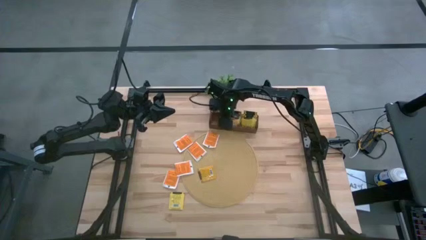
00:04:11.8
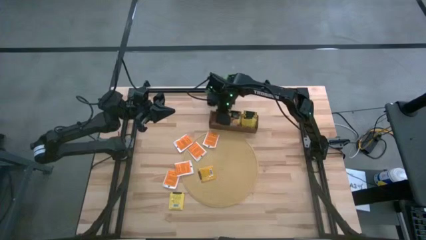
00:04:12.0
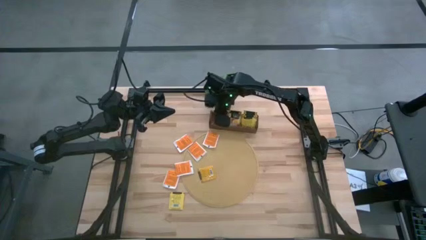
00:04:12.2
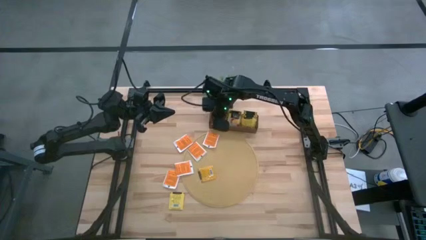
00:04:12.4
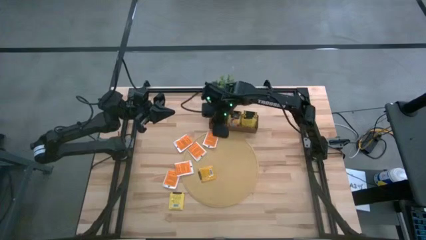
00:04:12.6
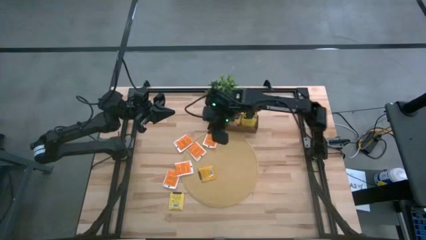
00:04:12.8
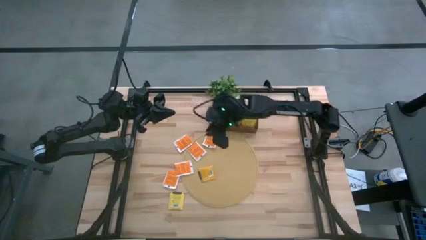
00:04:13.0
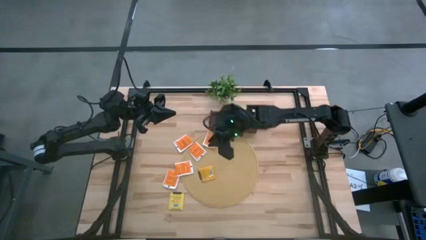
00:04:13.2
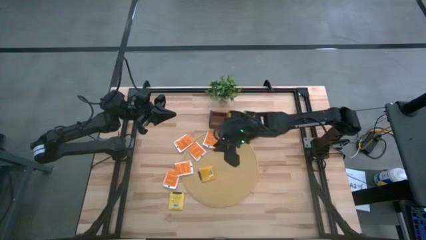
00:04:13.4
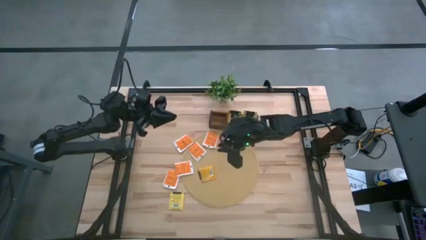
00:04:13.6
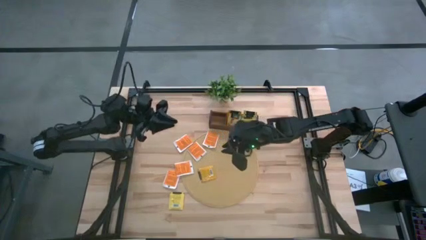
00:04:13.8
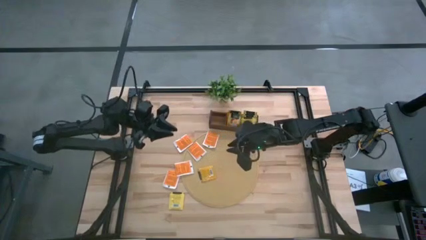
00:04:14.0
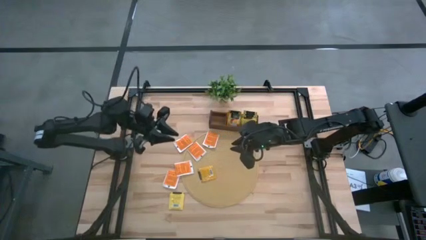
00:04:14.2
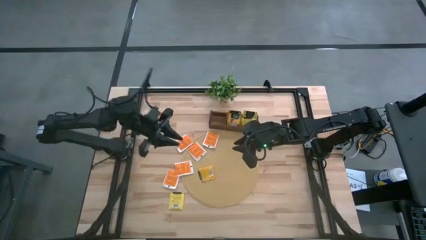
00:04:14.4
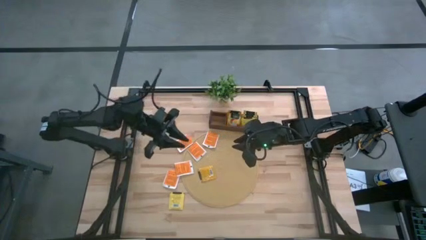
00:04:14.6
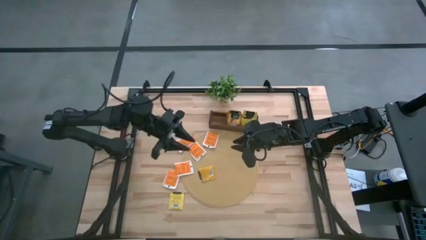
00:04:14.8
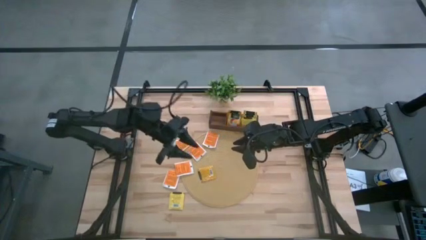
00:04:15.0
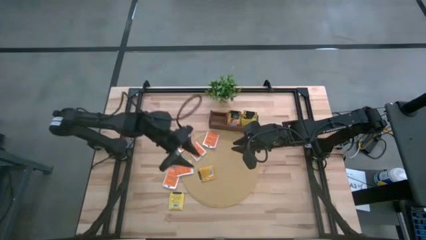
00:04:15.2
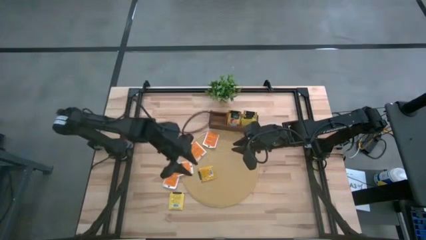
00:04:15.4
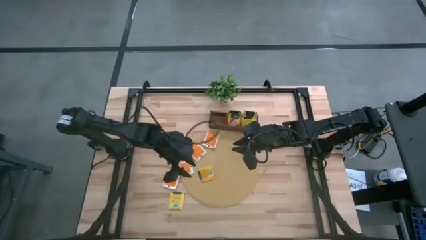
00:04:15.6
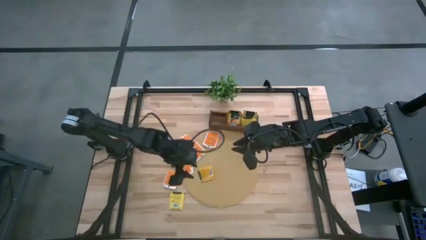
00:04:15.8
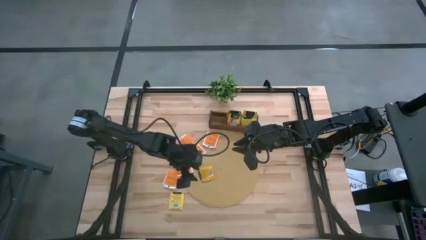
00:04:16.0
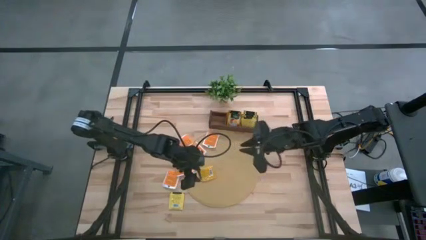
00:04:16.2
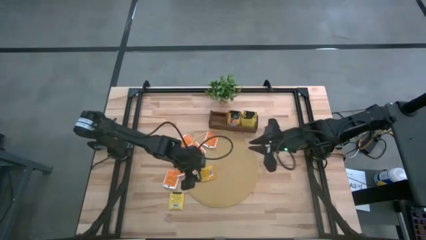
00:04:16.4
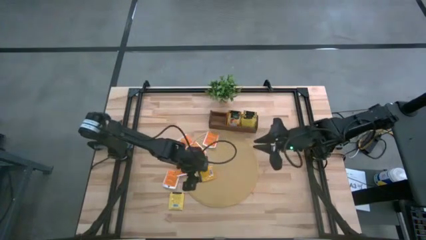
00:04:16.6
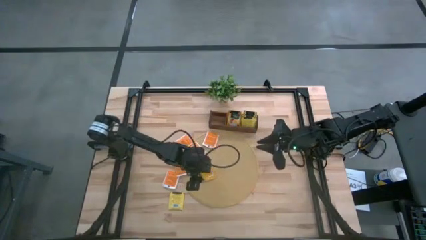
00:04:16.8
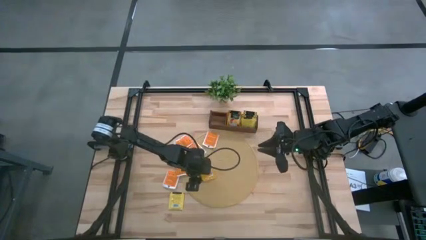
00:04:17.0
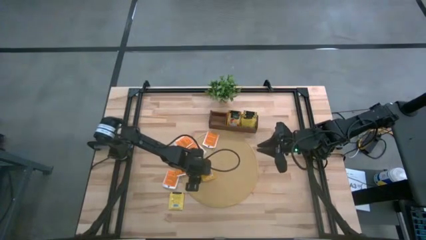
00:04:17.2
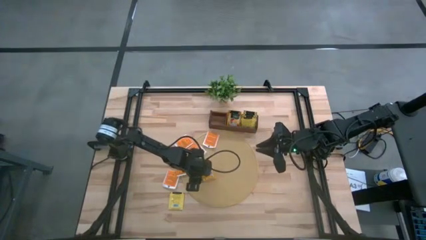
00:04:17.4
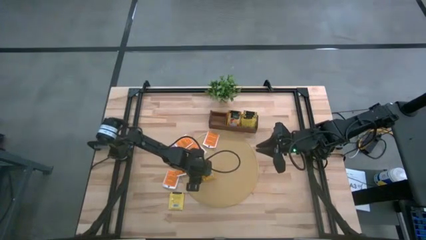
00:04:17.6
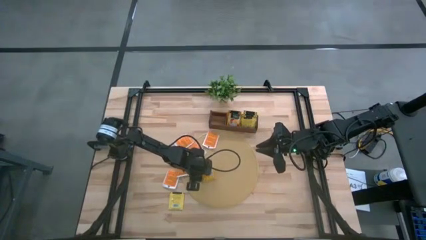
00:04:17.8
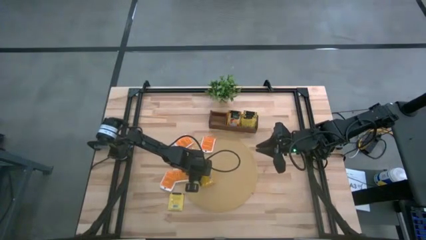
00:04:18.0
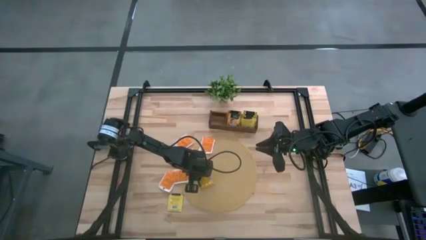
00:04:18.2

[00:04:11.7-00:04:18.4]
Task: Pick & Place Tea
Put the orange tea bag into the middle section of the wooden organizer

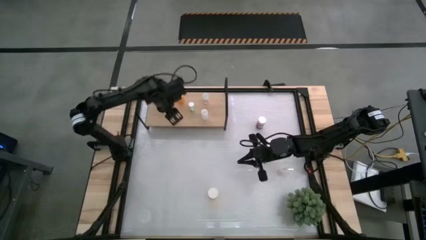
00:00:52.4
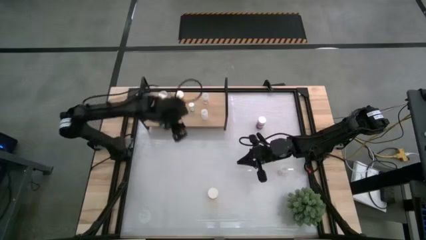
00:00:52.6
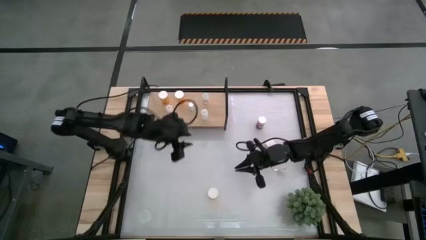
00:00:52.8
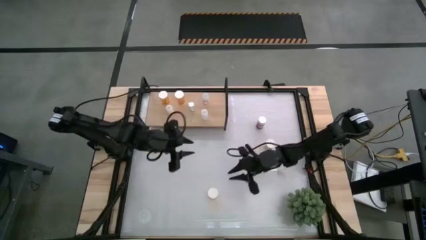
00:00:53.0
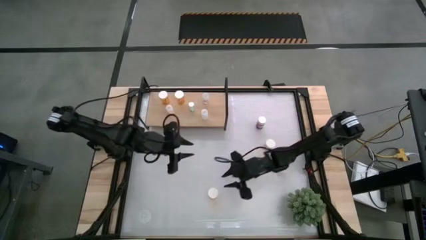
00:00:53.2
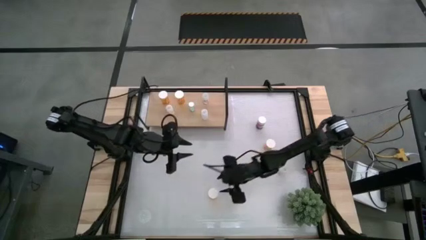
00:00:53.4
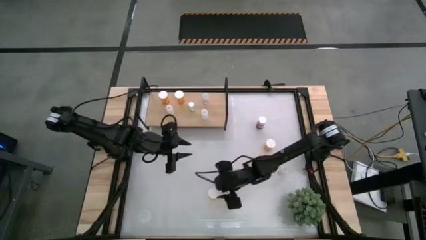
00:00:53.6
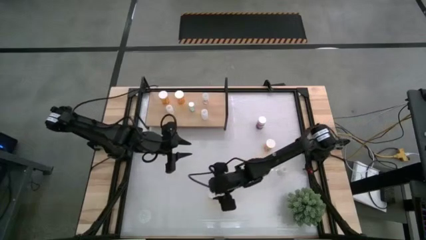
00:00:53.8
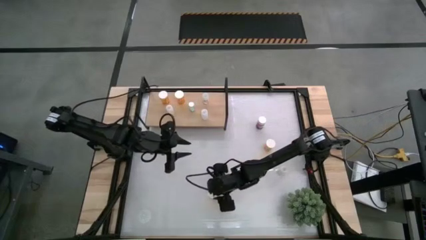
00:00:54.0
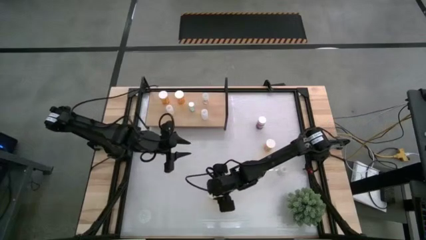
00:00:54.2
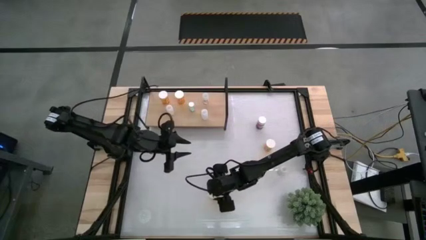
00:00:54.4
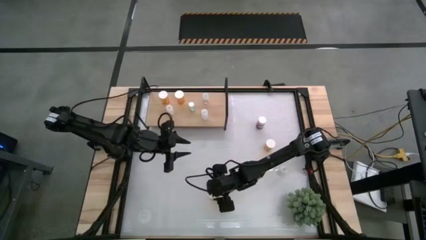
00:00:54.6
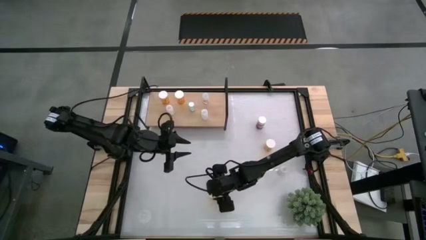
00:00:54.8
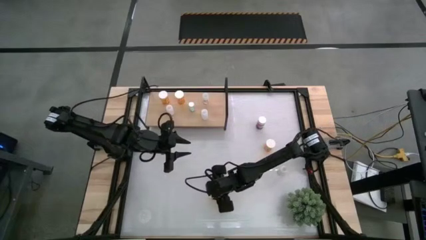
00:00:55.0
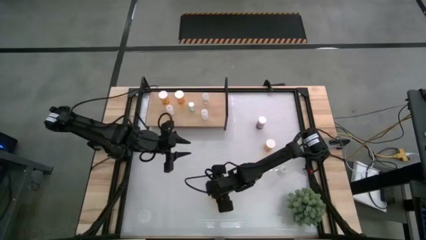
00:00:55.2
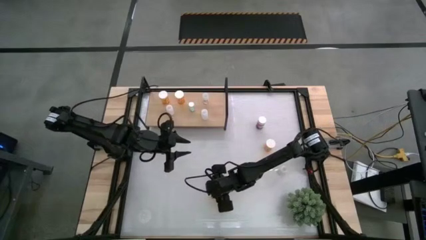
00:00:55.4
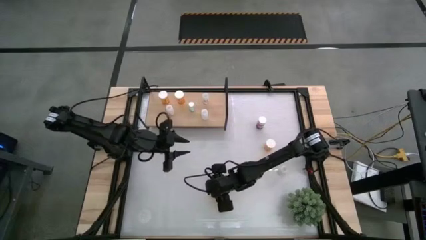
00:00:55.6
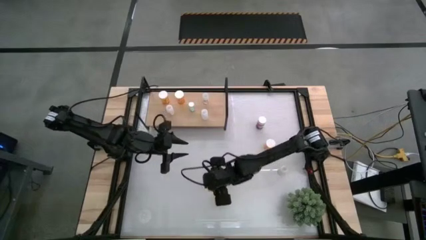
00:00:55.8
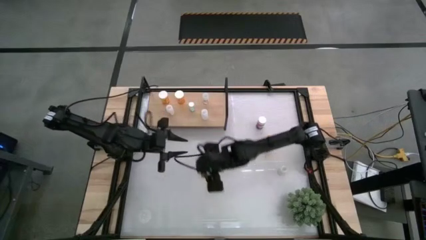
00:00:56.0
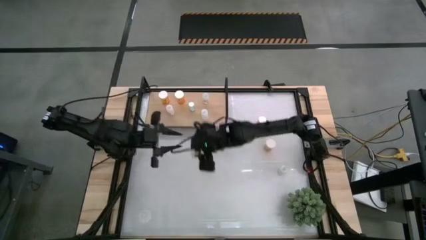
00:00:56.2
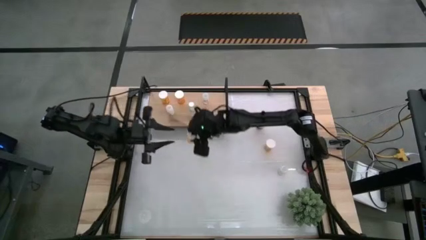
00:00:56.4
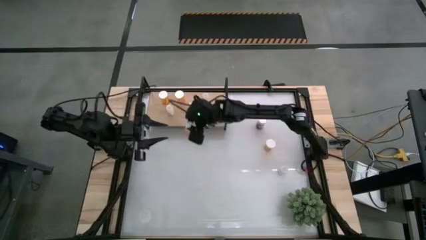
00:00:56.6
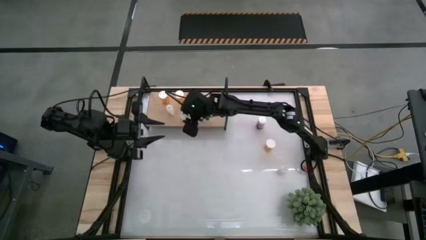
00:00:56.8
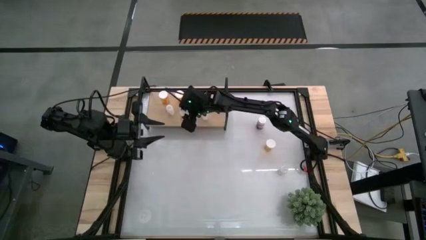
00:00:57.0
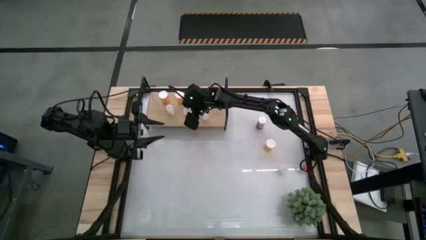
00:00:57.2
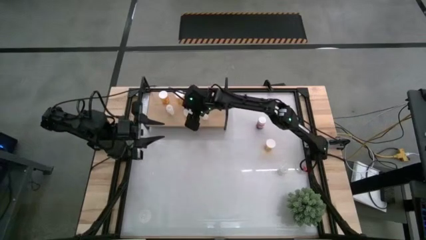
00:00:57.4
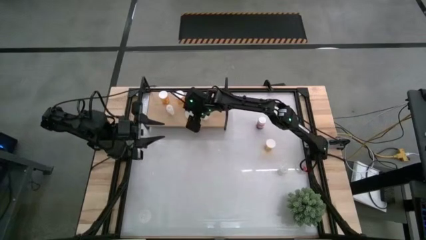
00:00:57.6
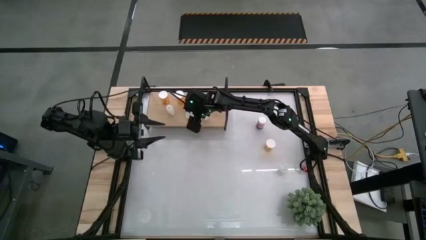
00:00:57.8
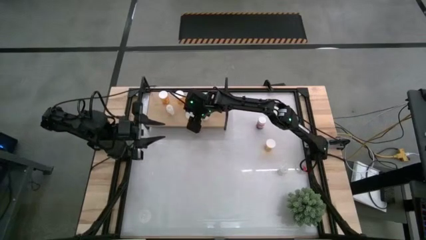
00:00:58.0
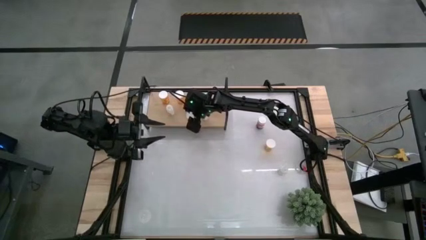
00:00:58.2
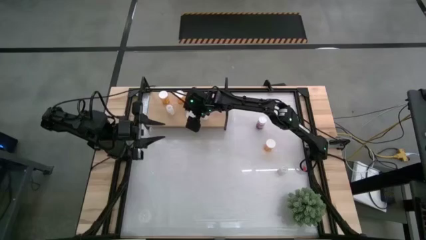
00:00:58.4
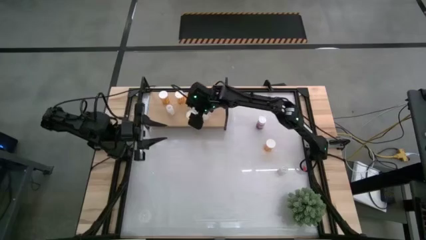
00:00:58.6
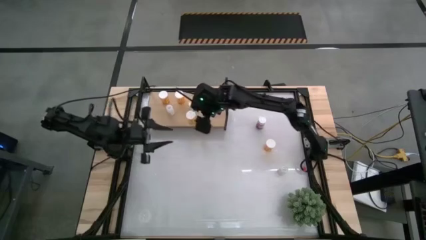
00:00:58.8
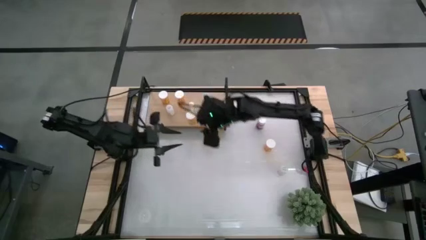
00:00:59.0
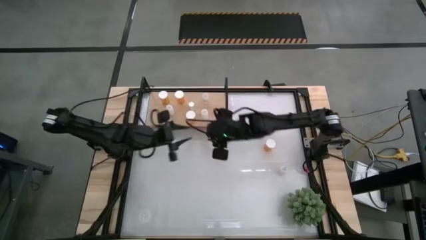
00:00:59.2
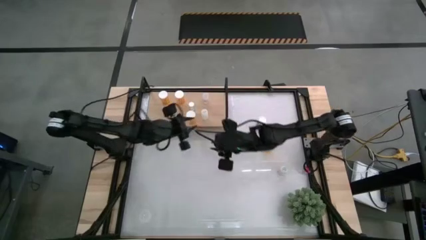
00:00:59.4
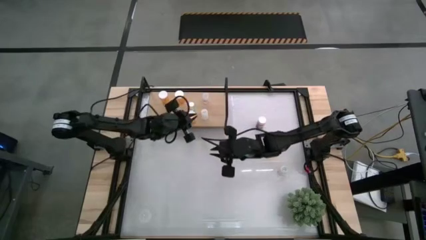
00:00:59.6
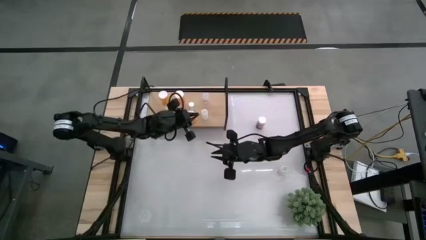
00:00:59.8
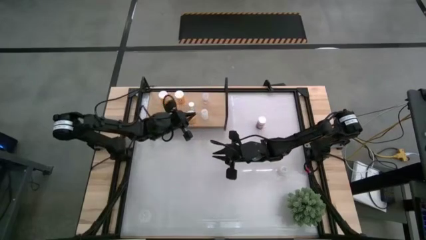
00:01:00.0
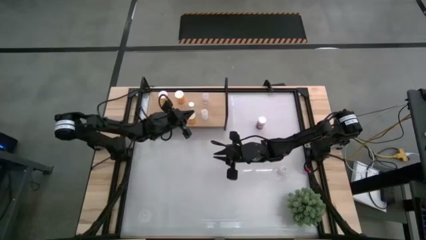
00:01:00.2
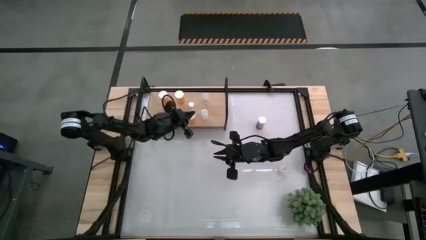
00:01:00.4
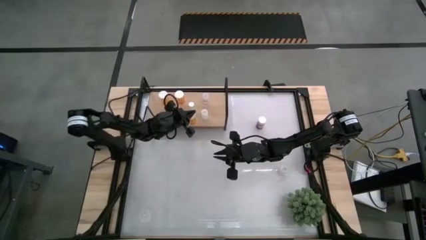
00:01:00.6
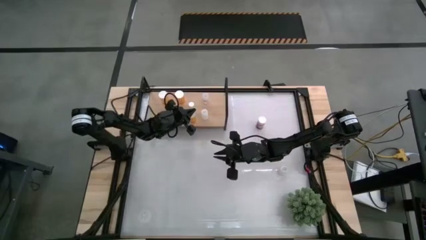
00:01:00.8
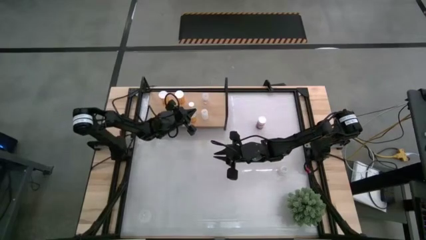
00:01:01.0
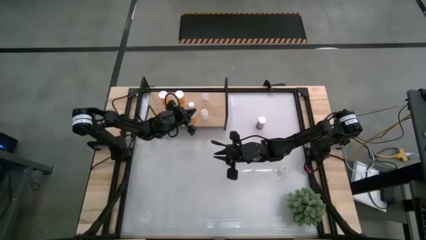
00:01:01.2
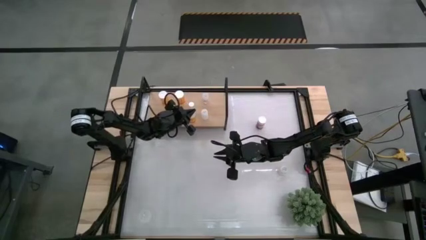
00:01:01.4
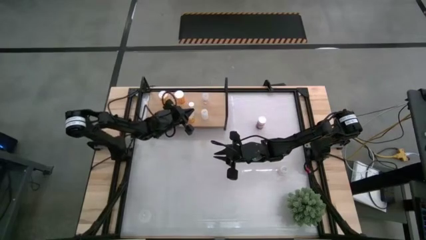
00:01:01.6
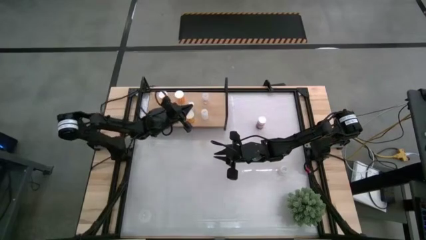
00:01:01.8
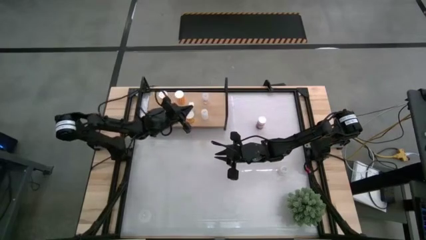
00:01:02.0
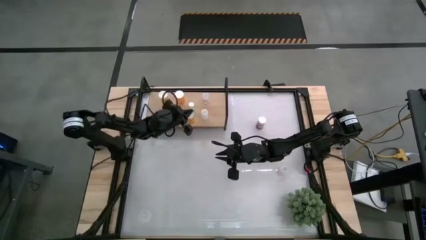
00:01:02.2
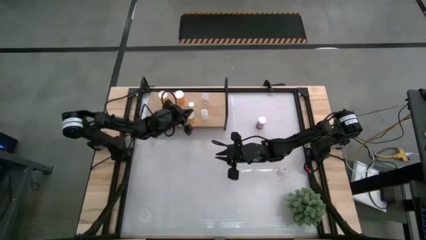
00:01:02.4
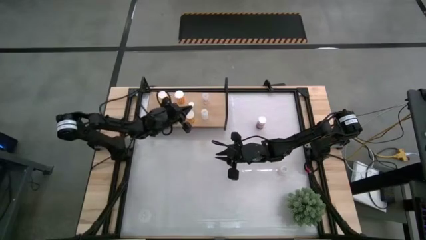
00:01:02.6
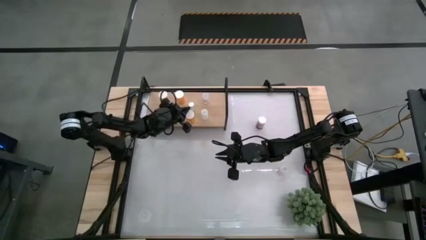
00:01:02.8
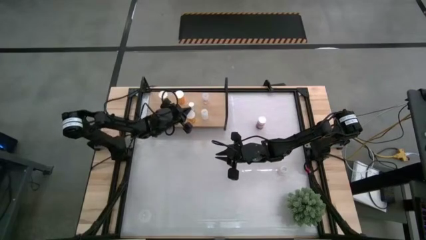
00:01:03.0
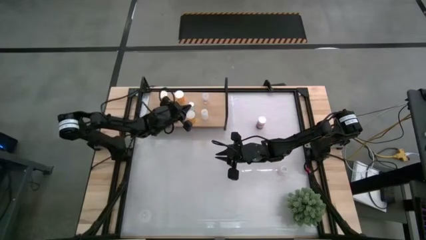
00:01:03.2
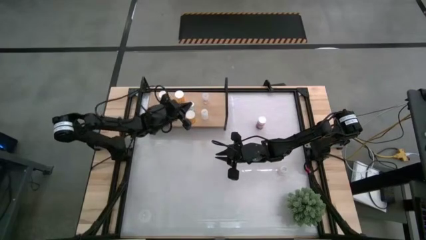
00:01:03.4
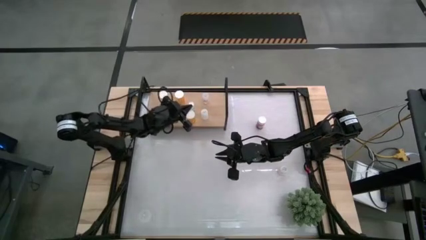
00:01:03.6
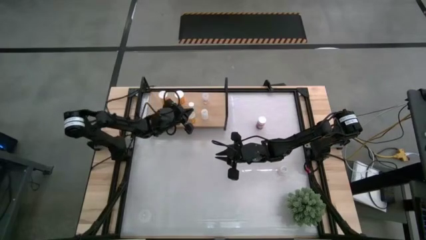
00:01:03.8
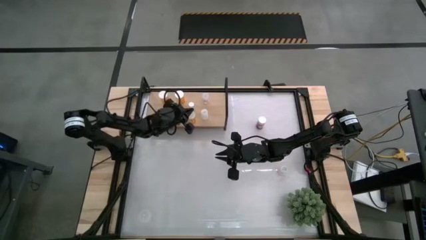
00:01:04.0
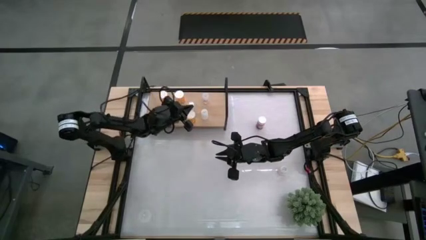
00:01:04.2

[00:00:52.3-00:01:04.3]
Task: Pick and place medicine bottles onto shelf by color
Put the bottom large yellow pill bottle on the shelf
